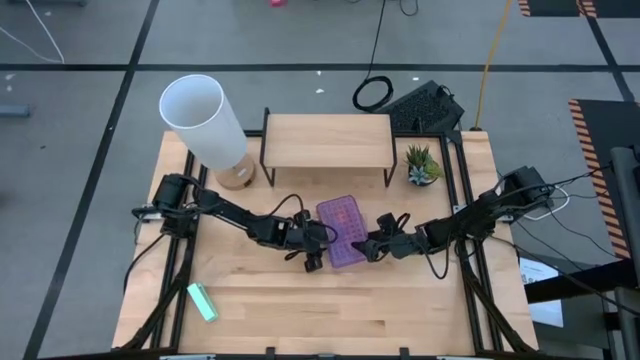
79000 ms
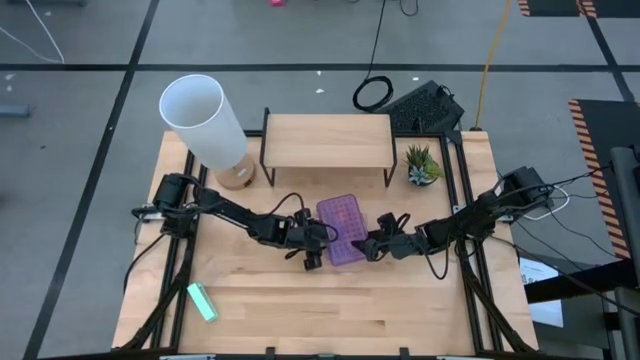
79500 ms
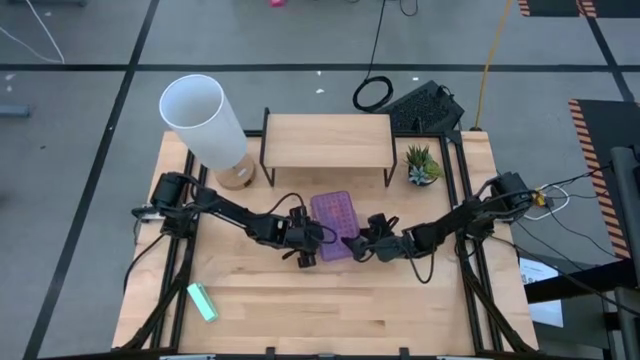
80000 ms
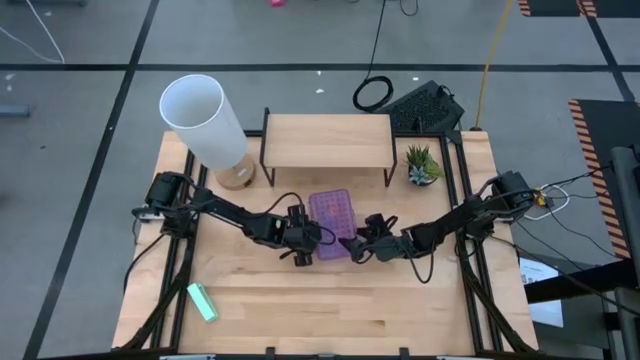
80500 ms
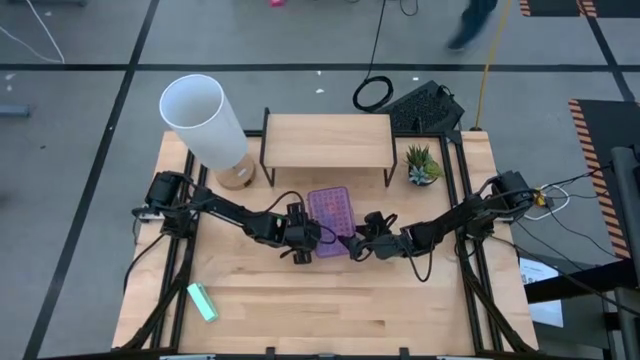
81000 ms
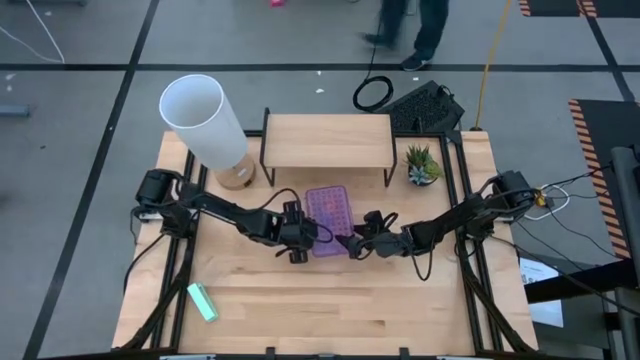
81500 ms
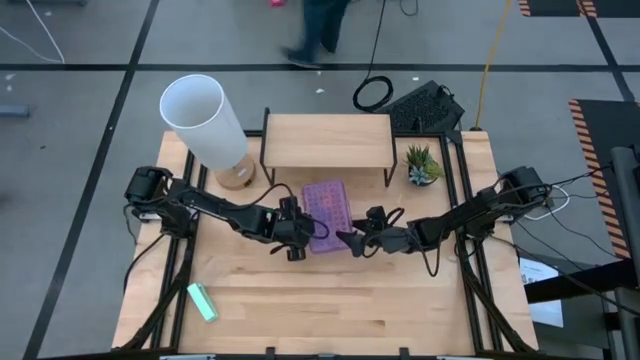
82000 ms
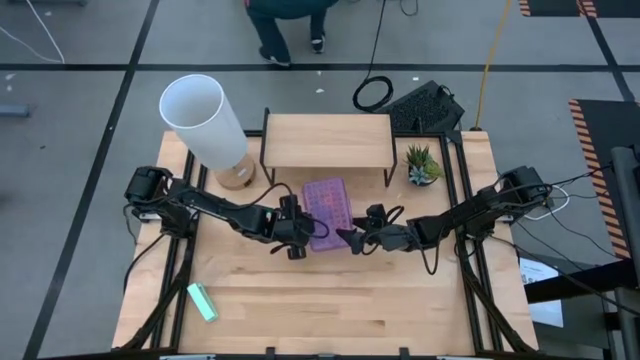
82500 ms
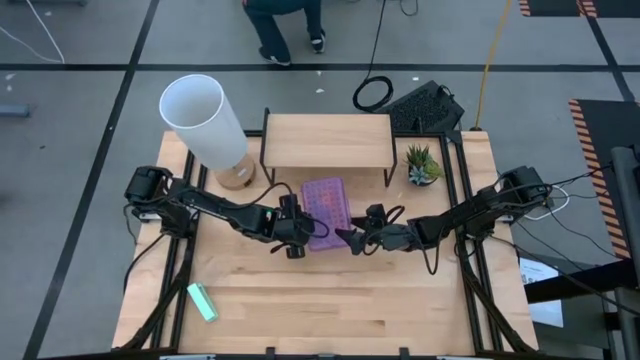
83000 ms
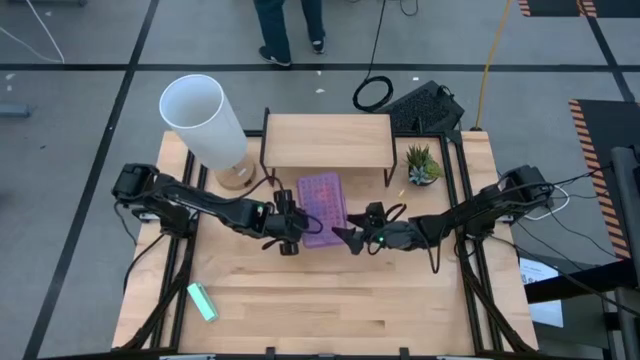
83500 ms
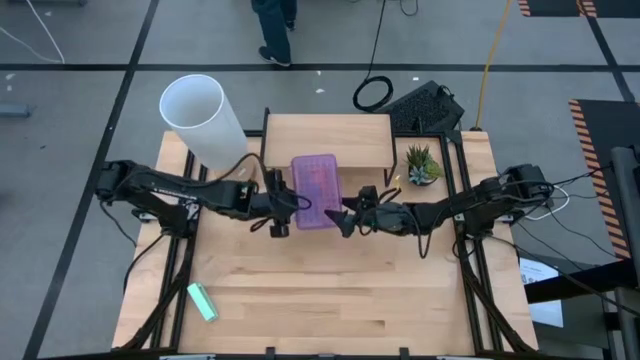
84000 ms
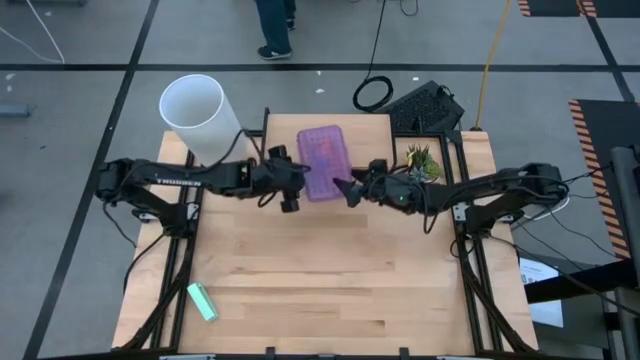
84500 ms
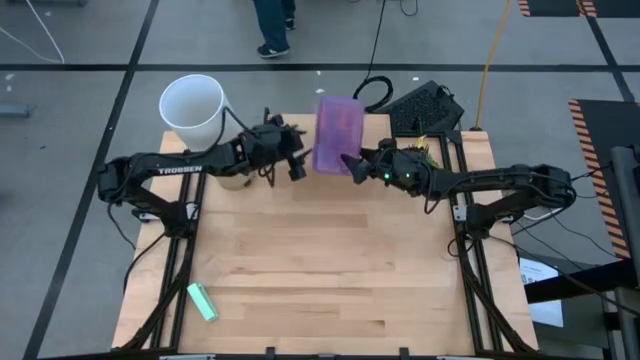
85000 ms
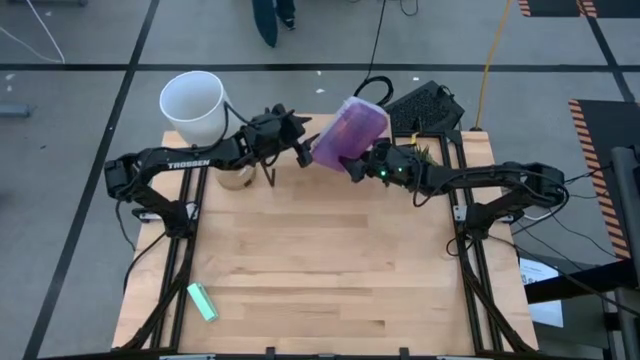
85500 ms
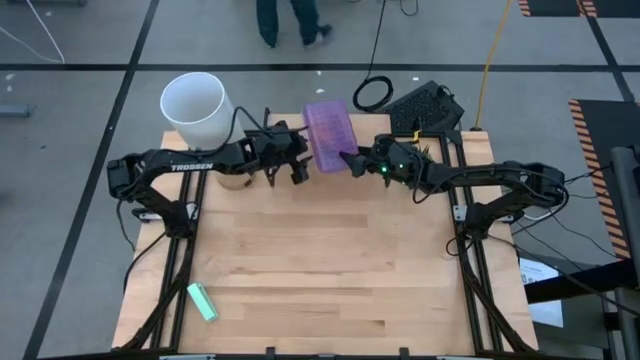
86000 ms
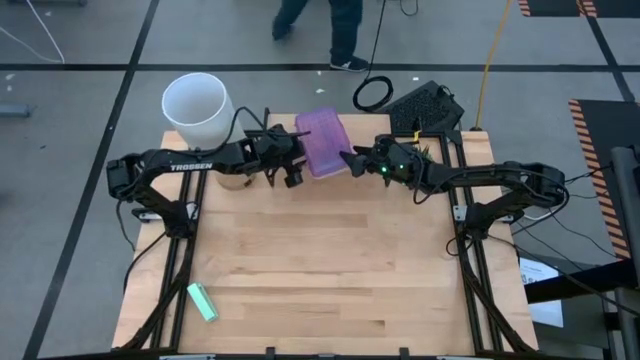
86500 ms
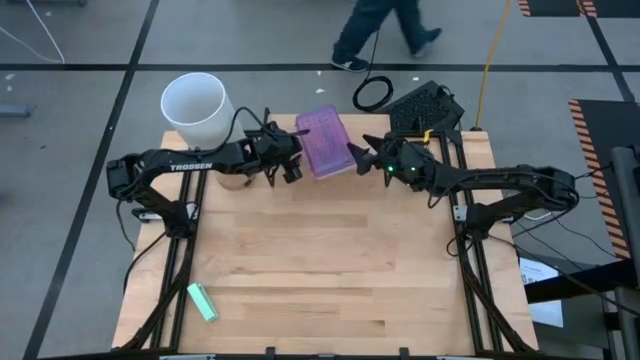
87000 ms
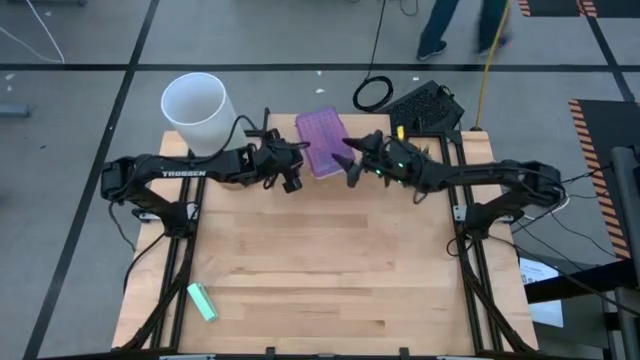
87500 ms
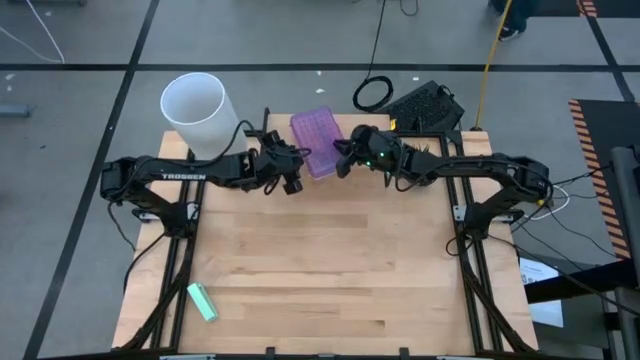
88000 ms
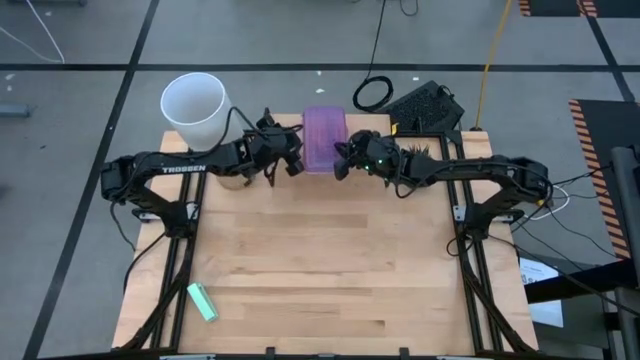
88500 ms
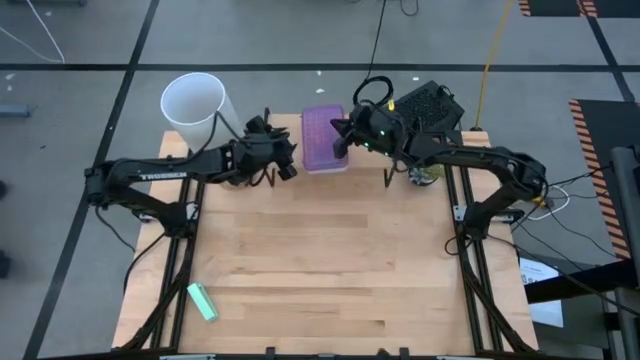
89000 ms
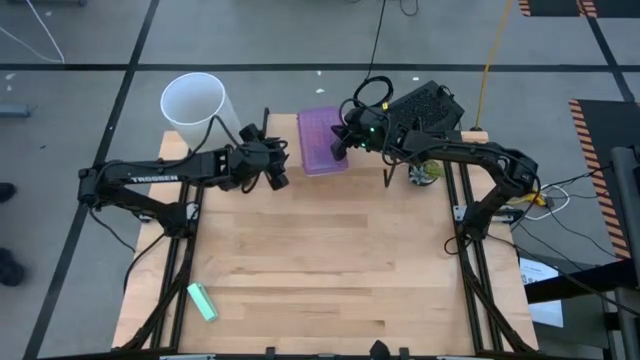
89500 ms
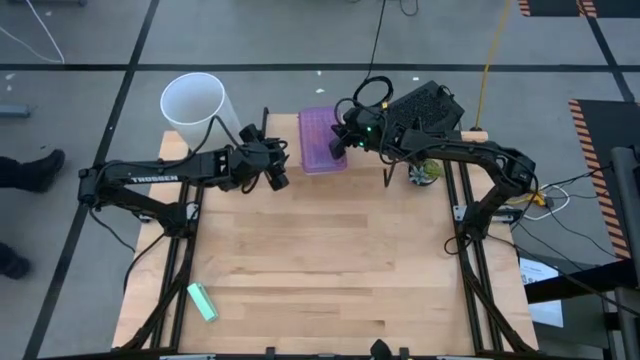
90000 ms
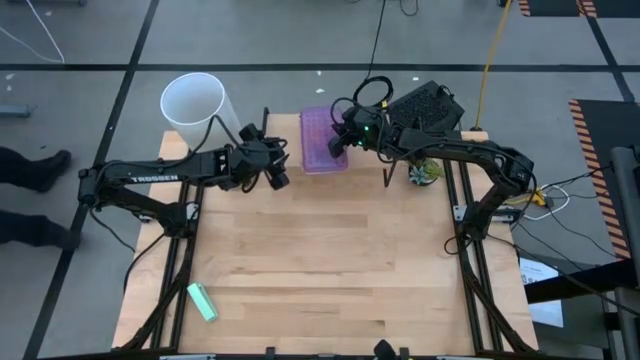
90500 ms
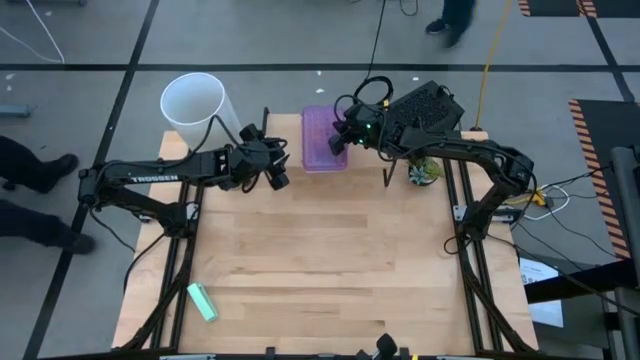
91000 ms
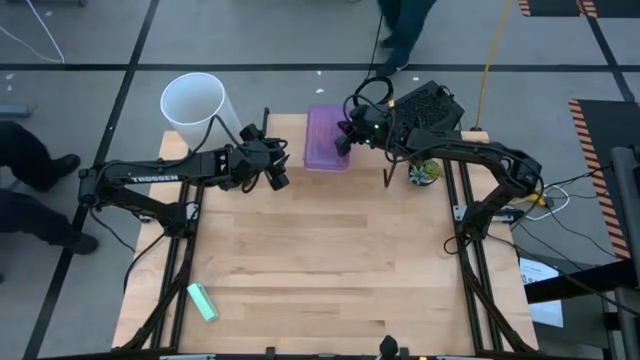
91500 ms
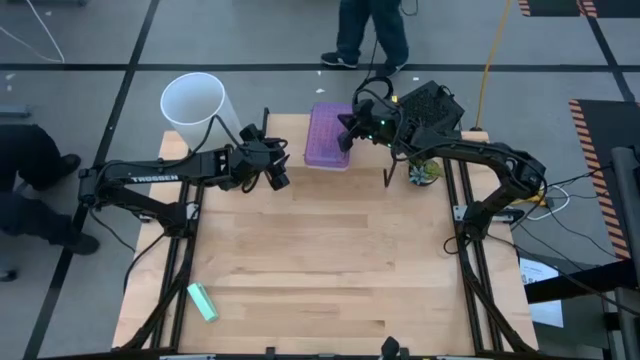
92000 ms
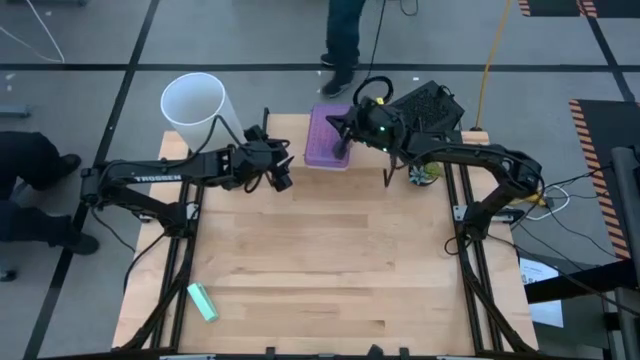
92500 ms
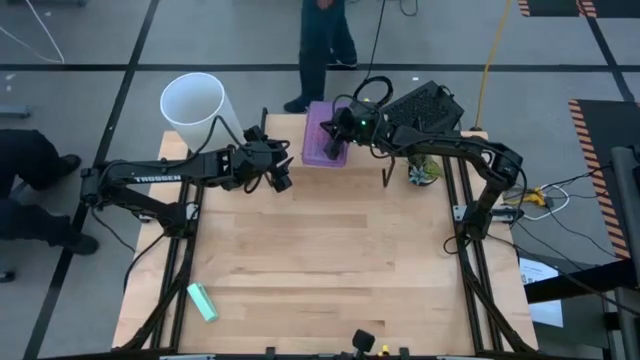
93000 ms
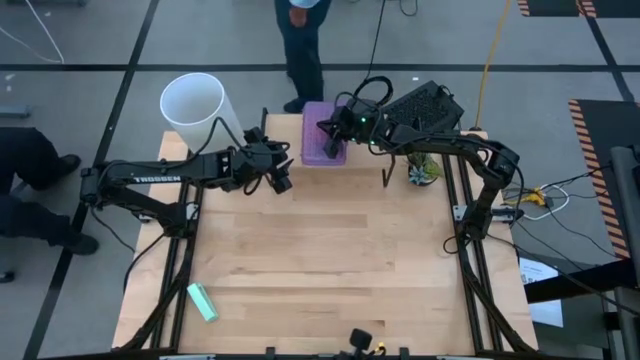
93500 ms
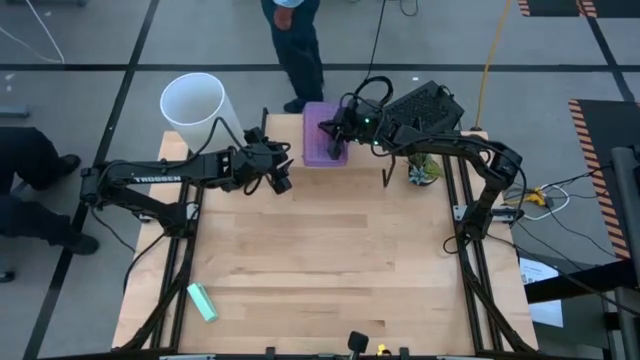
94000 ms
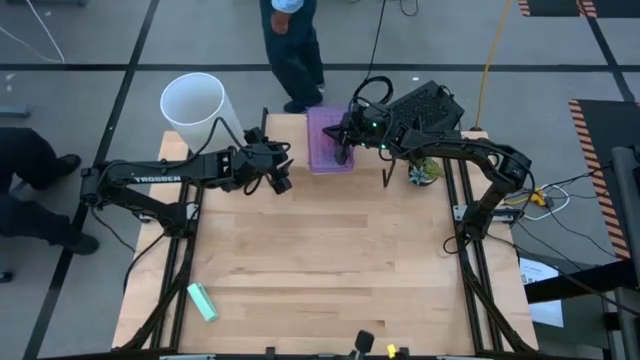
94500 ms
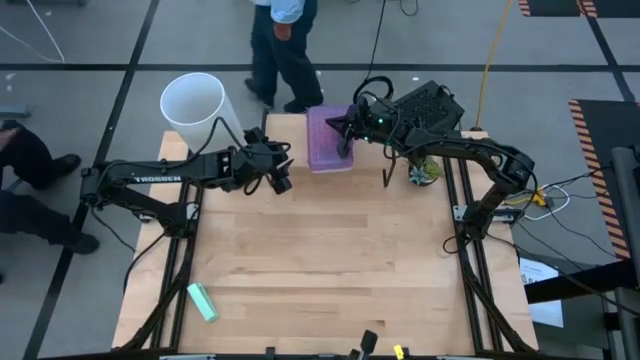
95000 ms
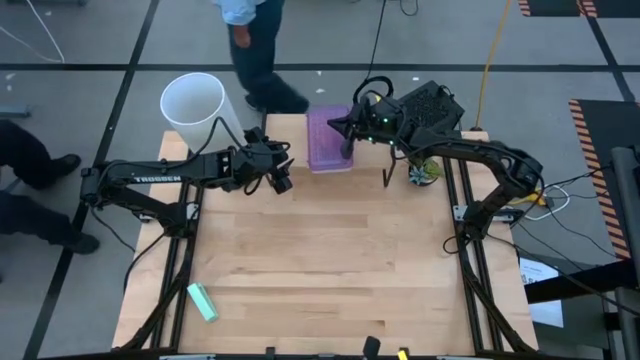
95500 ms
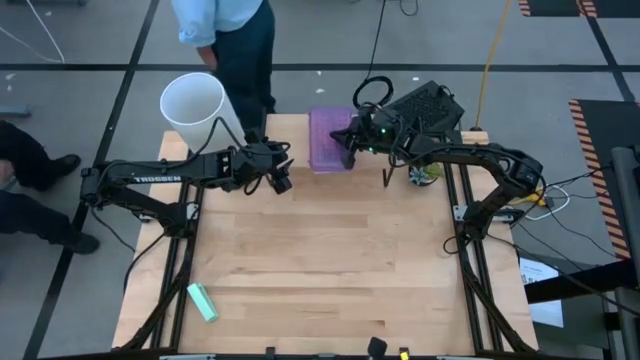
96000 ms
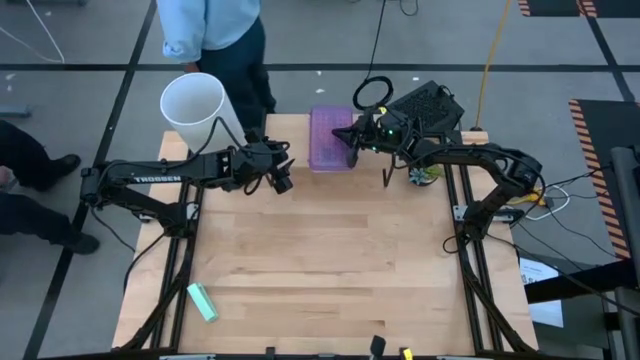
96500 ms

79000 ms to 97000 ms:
Task: Pack school essentials
Put the transparent violet supply box on the shelf

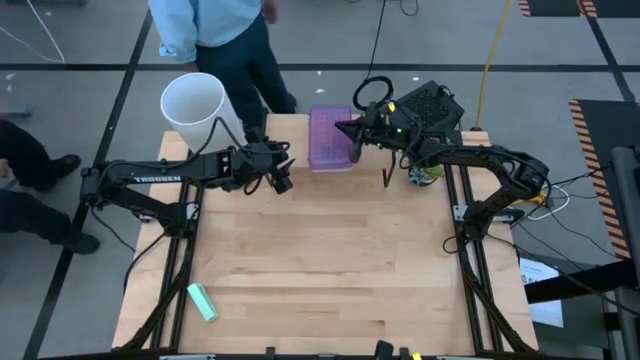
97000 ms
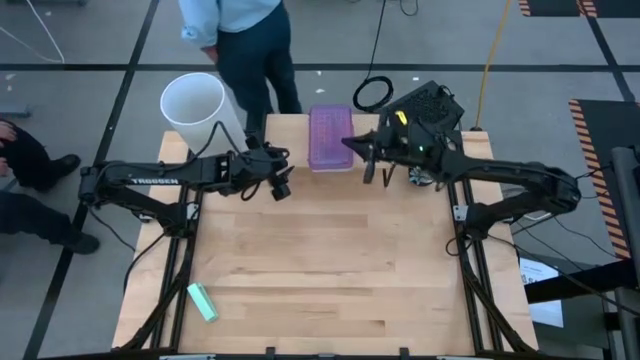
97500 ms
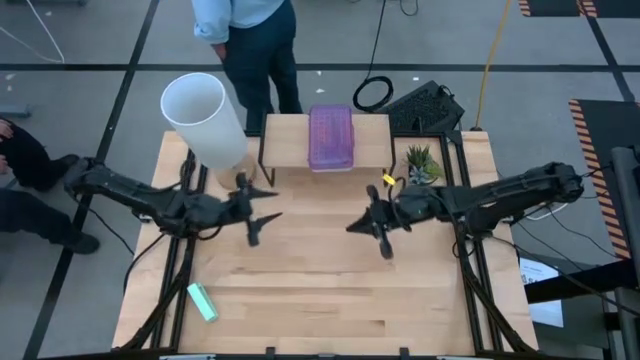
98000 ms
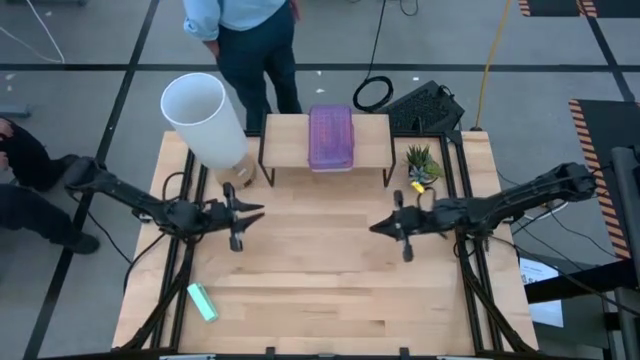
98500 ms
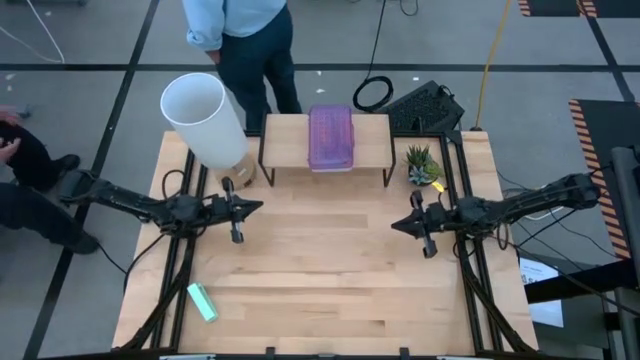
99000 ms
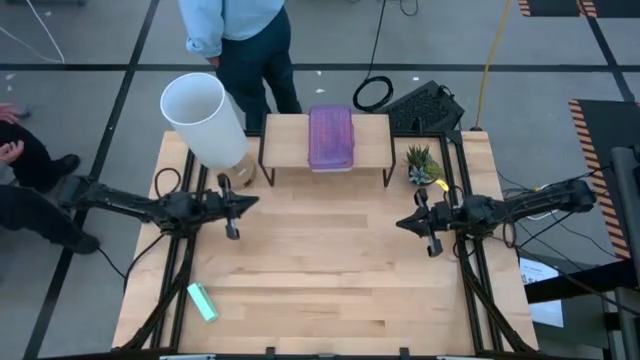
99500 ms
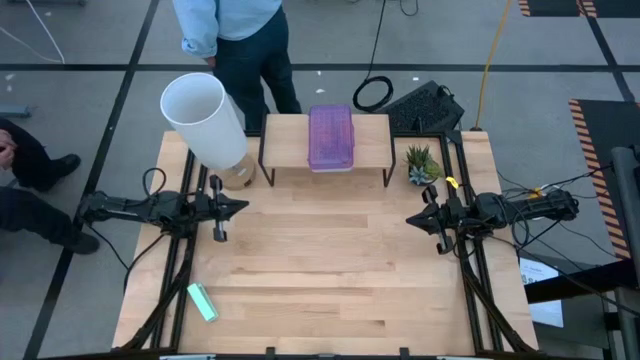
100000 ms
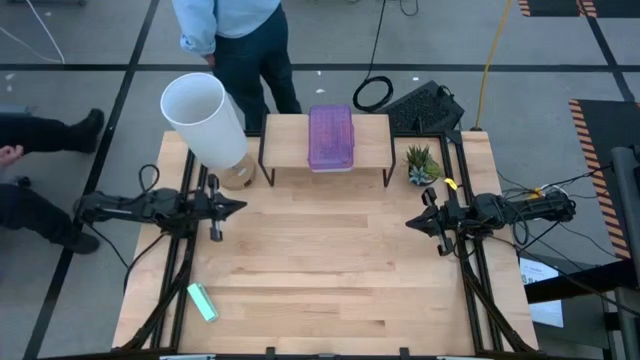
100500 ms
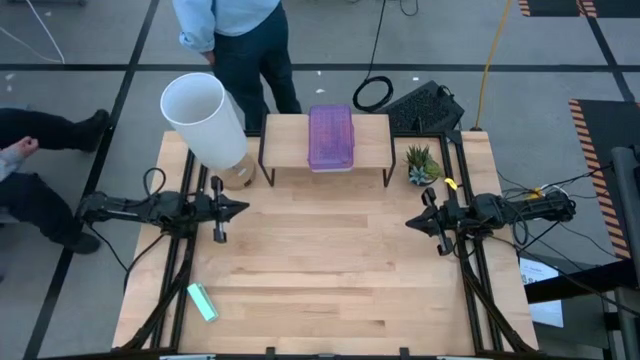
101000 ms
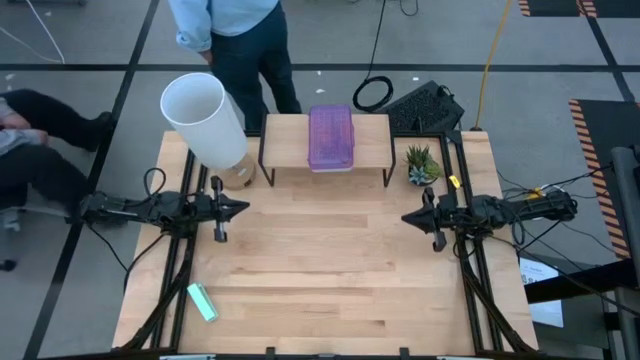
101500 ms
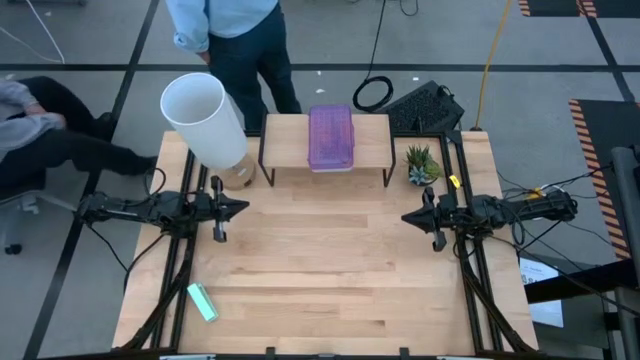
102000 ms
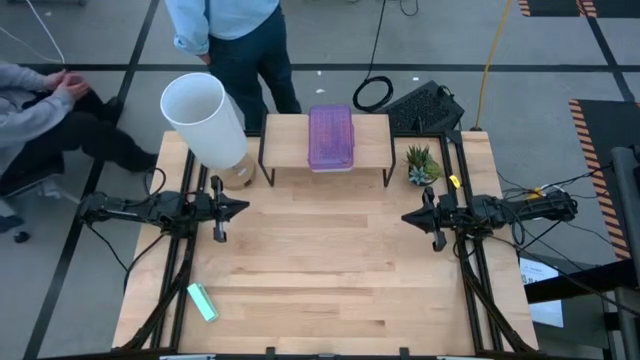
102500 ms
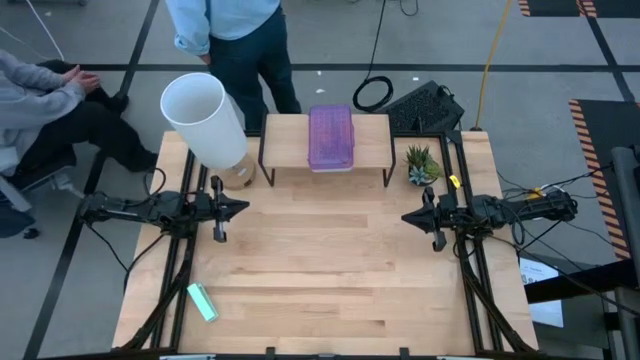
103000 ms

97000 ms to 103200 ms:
Return to Home Position
